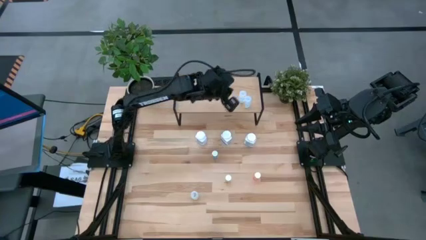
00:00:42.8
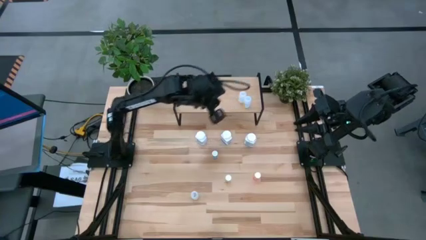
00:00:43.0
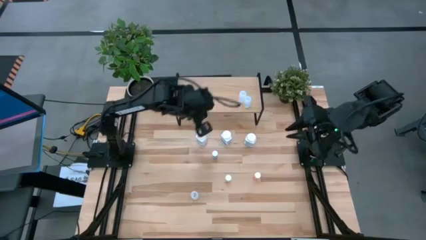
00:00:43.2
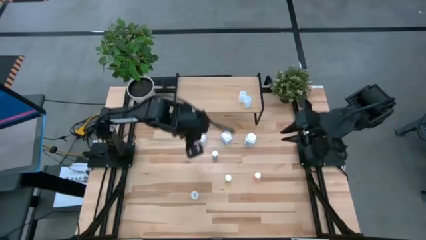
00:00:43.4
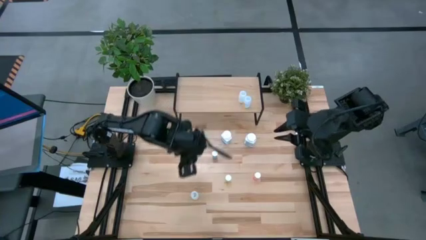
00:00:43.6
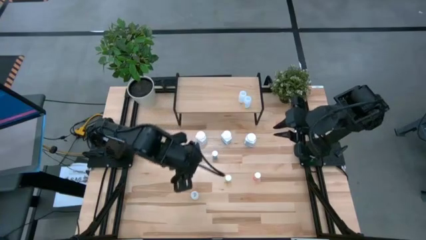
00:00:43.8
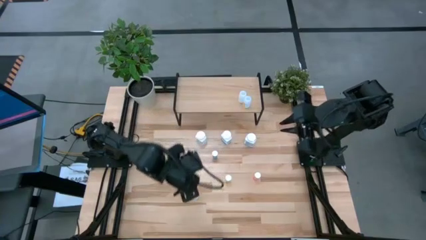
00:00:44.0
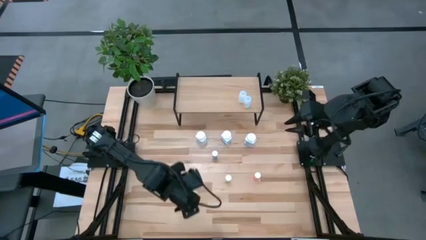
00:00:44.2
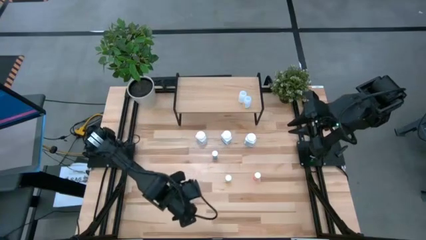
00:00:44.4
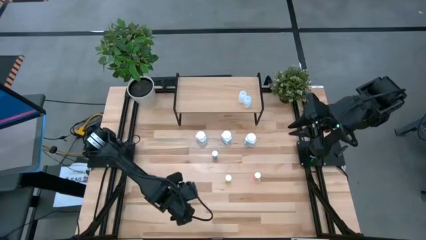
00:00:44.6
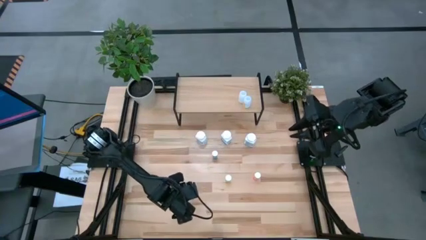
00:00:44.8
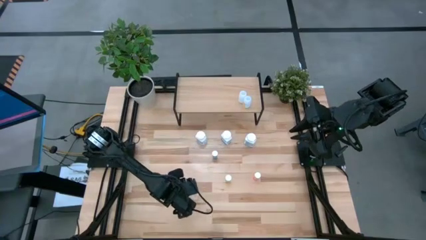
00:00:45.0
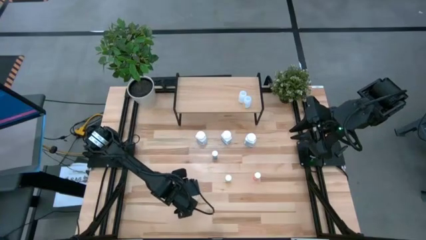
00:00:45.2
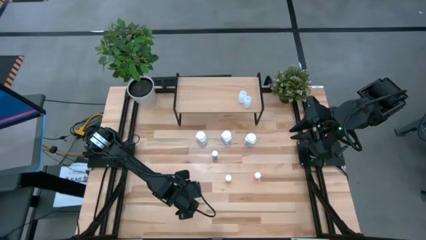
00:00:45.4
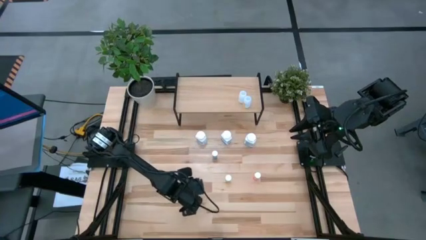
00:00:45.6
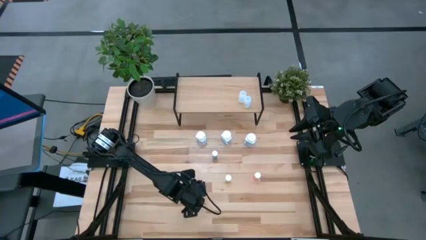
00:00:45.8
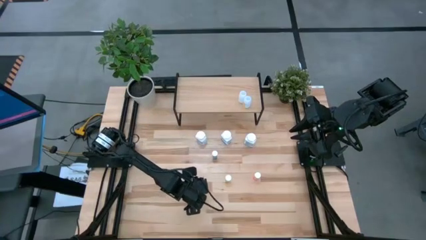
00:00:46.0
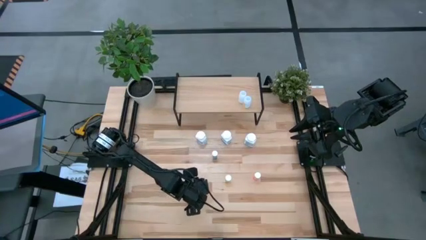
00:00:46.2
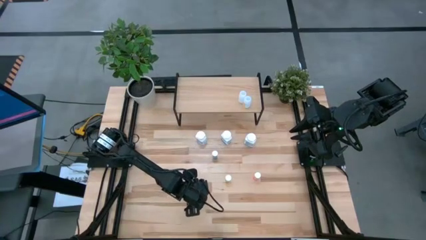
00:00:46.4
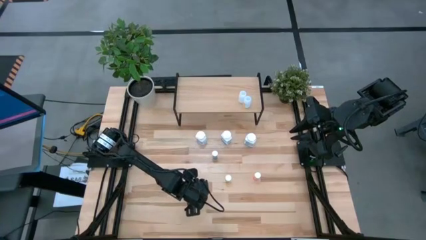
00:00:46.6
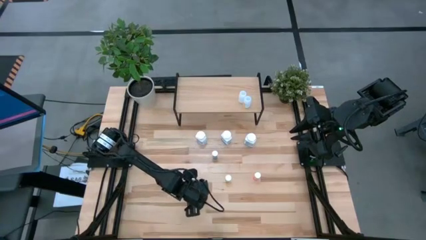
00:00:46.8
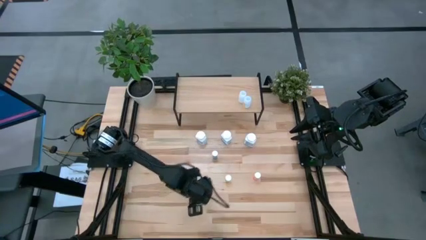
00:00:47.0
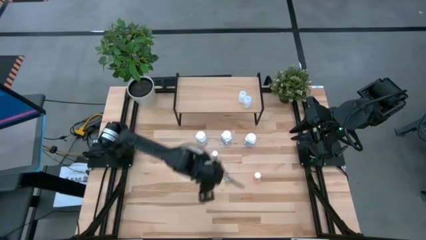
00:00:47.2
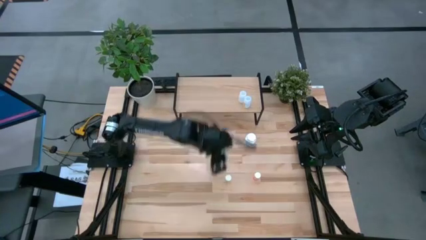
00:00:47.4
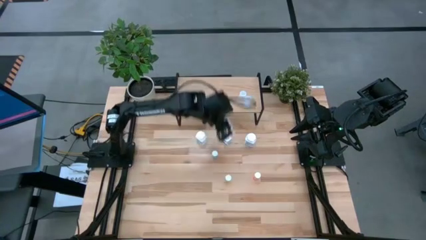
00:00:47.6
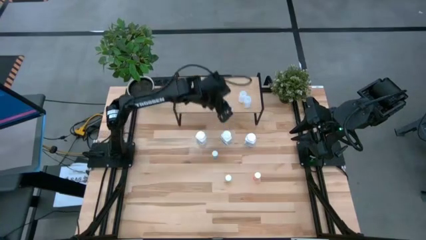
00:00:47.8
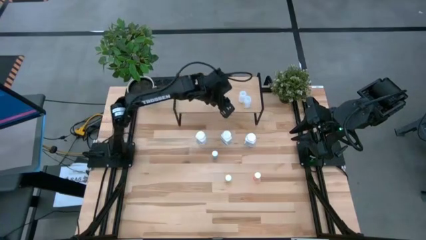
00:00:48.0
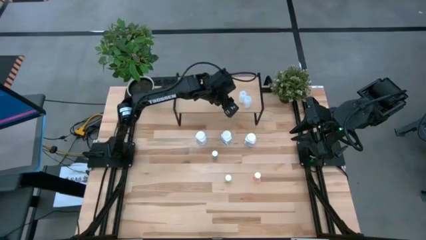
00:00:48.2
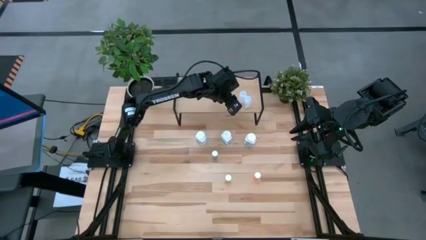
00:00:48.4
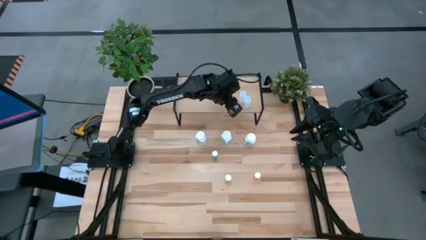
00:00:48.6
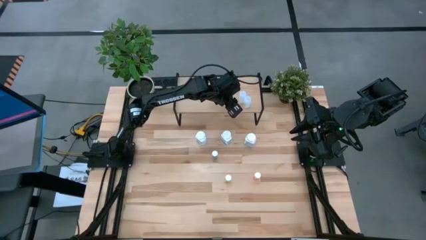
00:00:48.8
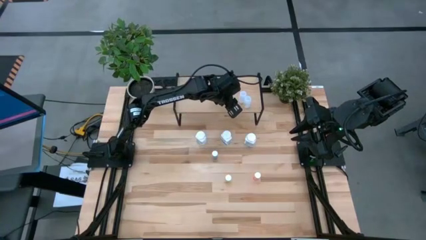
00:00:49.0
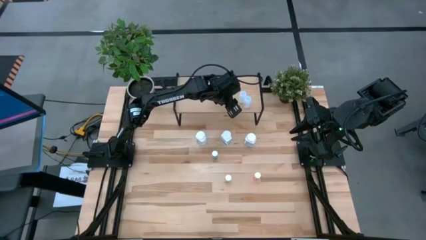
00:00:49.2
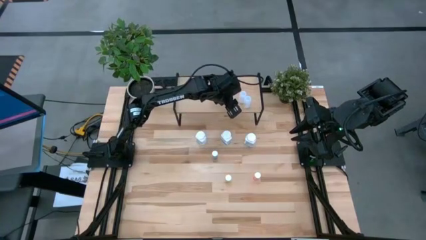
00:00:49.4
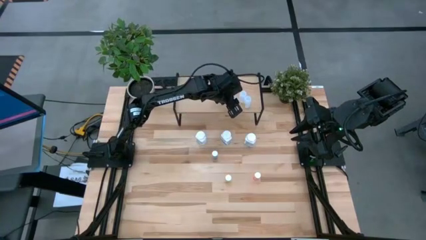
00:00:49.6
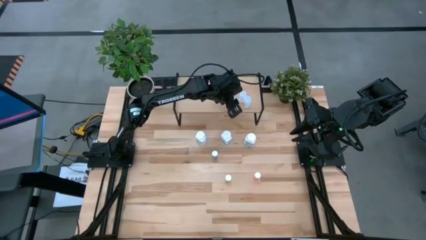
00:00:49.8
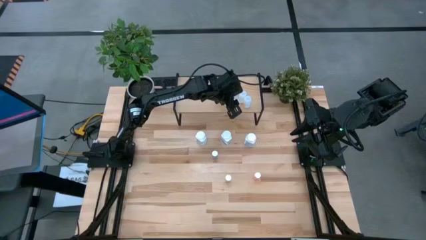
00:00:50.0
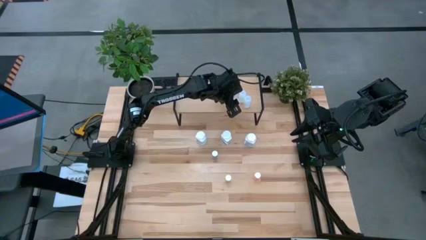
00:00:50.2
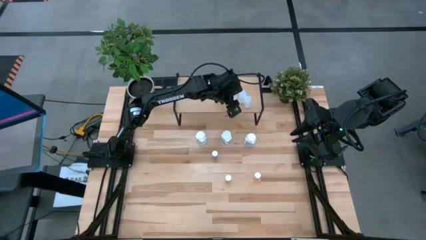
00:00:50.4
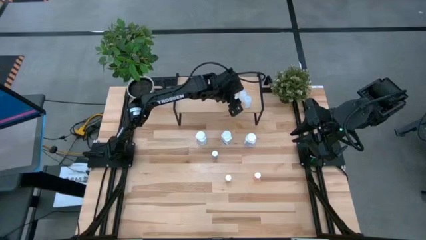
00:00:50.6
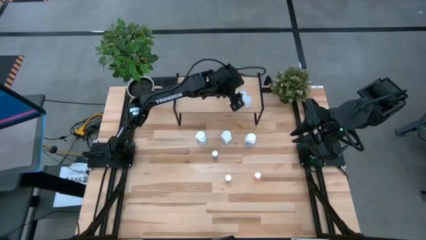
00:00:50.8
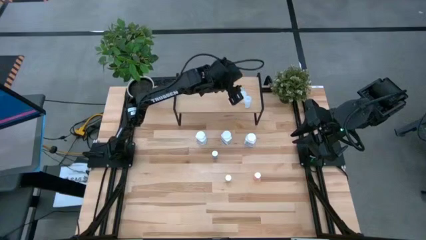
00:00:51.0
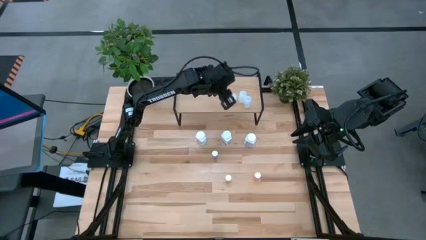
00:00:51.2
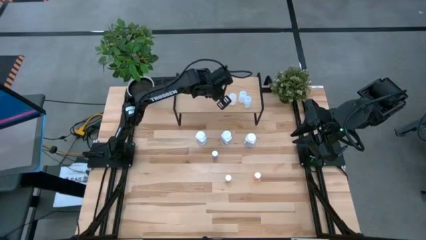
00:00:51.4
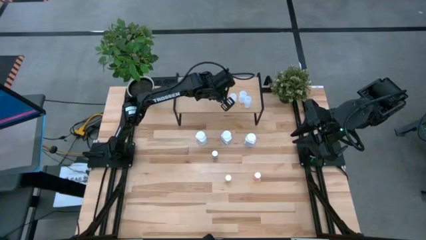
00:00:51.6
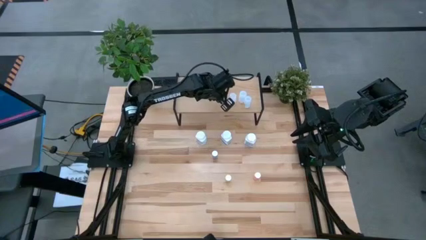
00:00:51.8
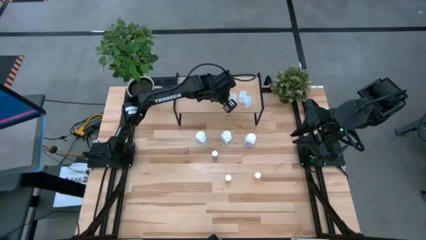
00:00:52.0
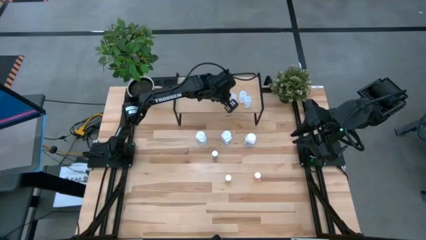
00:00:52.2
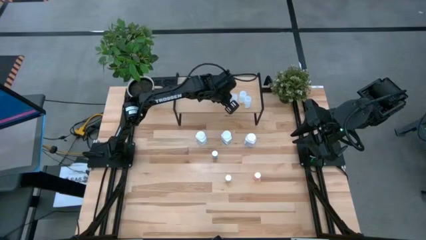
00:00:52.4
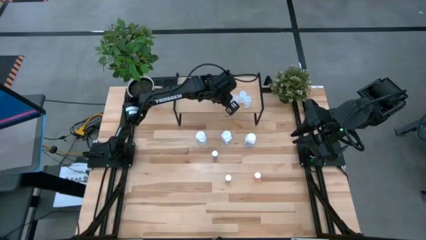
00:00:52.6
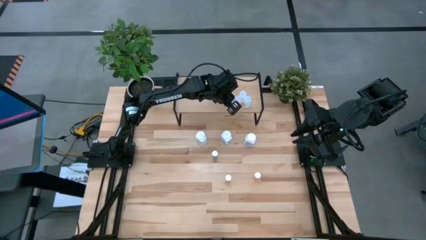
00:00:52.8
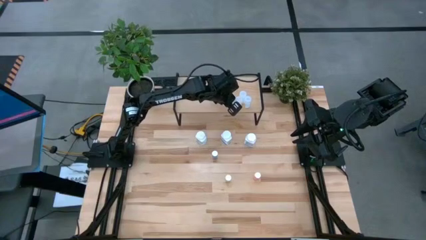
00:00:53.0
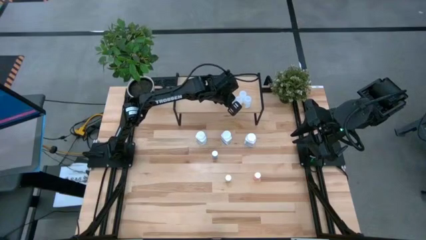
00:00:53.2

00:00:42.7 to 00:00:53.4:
Task: Pick and place medicine bottles onto shelf by color
Put the white pill bottle on the shelf

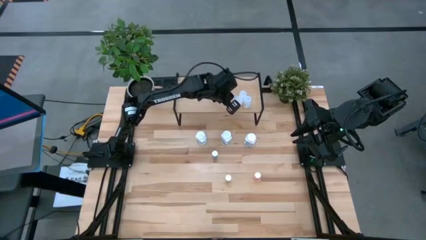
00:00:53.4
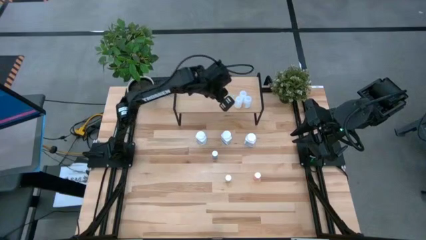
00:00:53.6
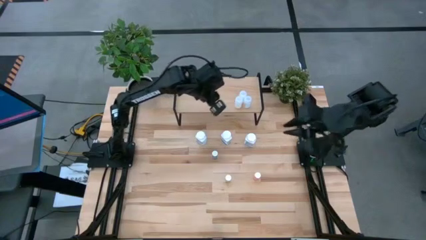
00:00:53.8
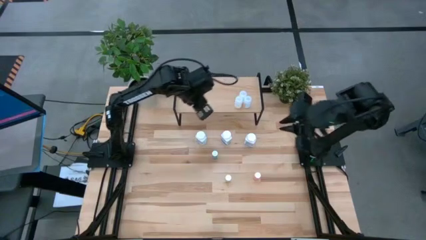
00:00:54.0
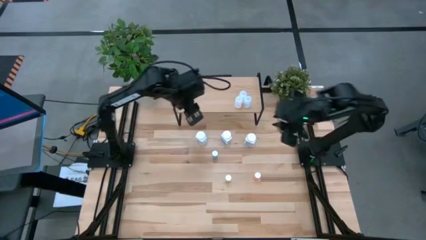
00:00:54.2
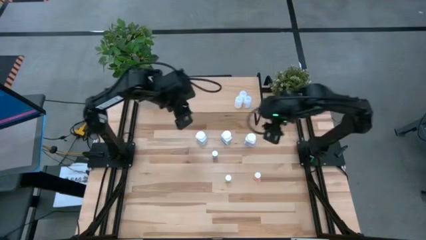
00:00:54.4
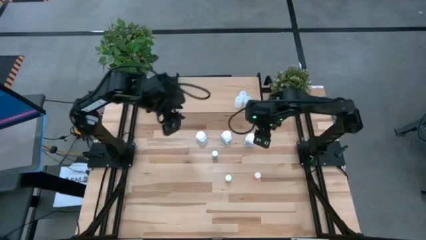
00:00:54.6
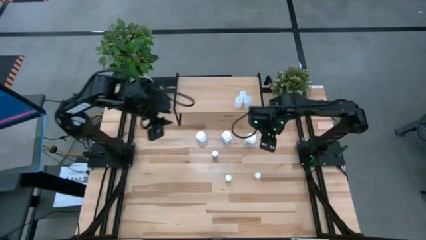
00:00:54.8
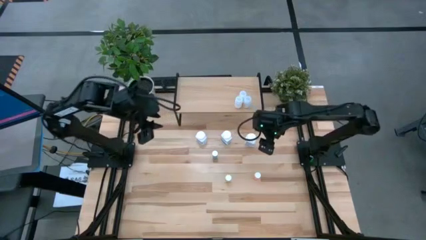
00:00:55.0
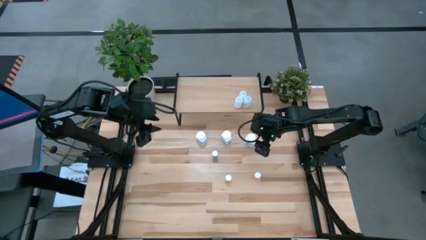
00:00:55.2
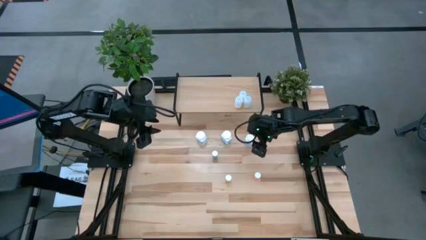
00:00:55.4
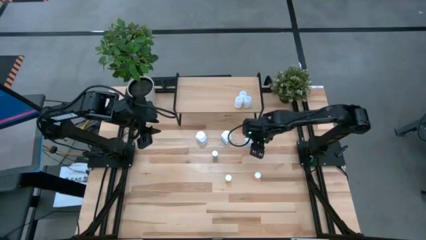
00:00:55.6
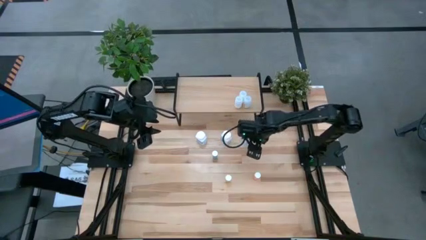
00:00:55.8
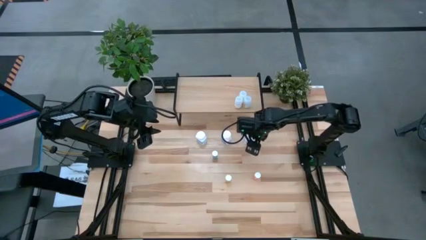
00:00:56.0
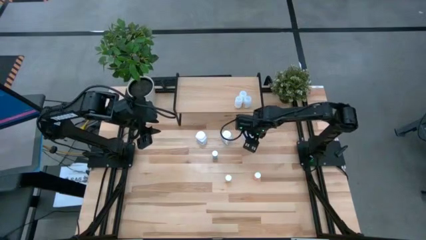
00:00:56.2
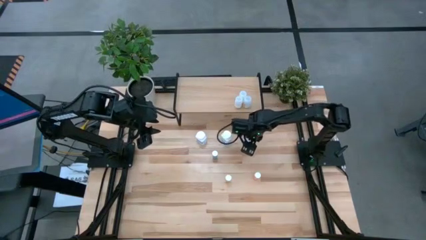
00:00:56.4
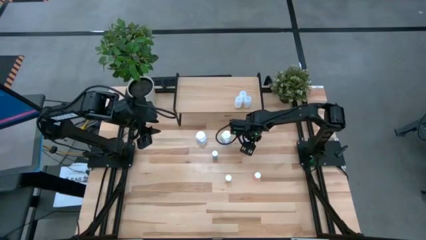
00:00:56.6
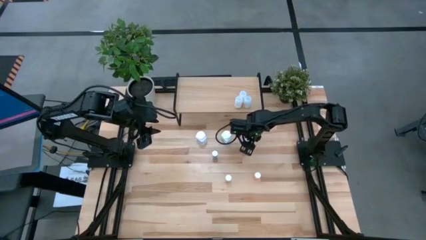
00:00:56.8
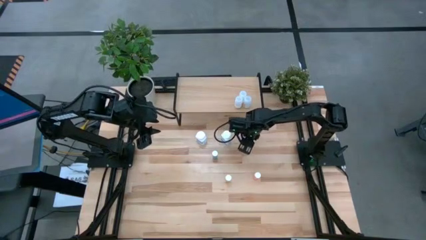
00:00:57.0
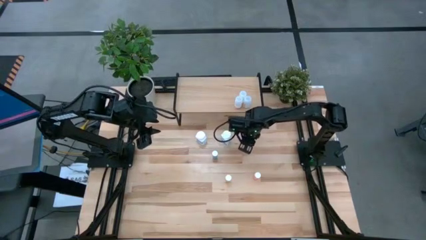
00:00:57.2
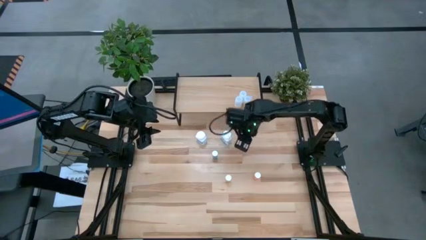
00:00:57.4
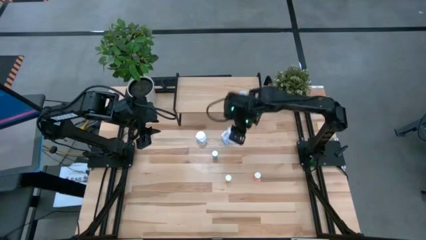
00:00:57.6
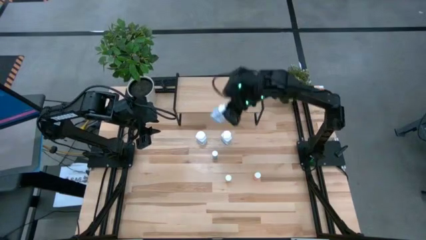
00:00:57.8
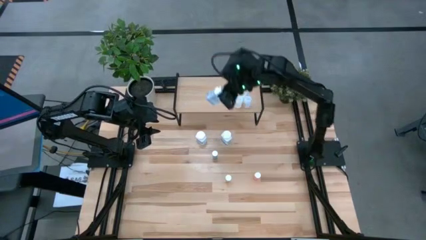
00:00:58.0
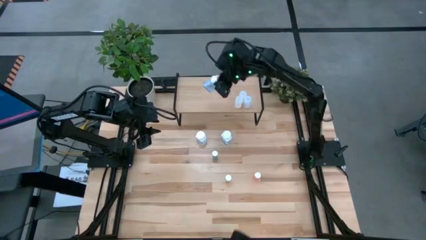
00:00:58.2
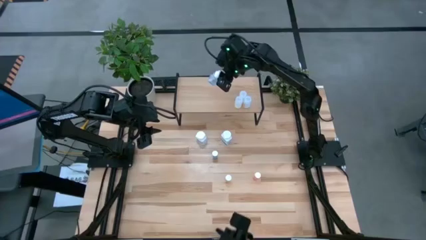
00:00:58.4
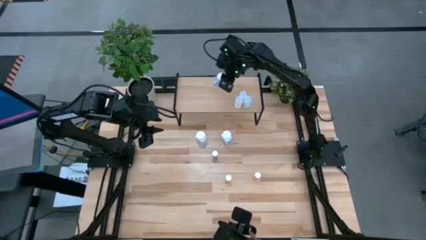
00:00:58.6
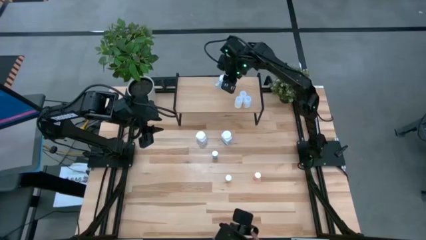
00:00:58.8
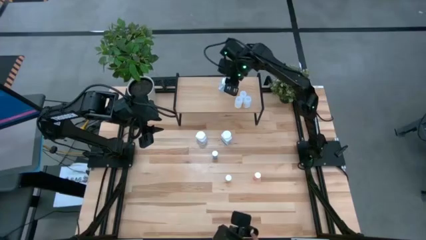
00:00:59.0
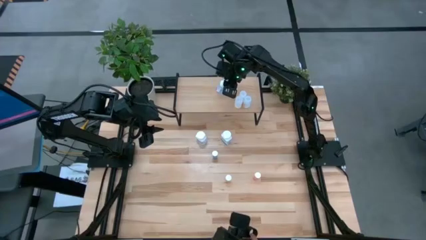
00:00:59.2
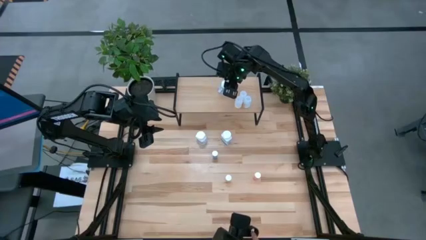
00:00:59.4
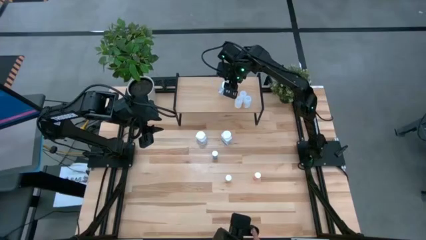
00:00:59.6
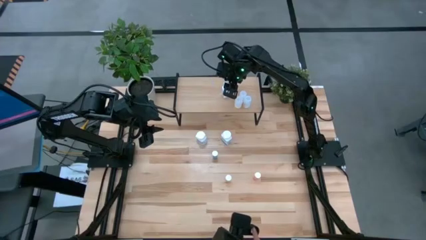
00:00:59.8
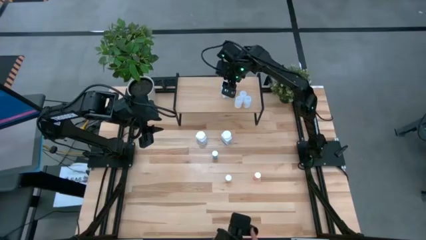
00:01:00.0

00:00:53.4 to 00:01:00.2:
Put the right white blue pill bottle on the shelf
